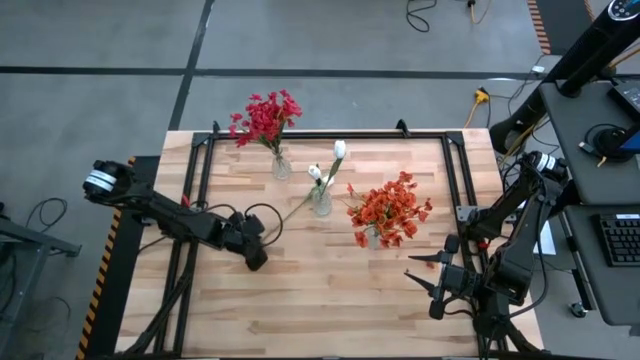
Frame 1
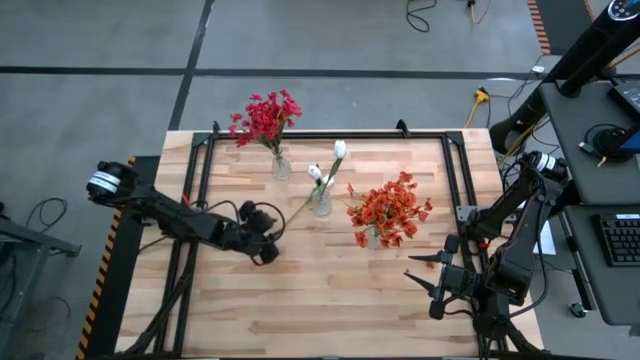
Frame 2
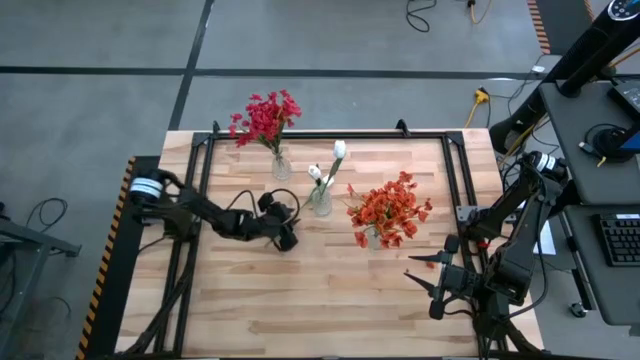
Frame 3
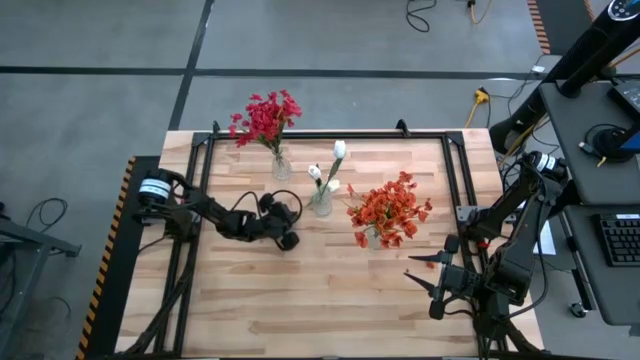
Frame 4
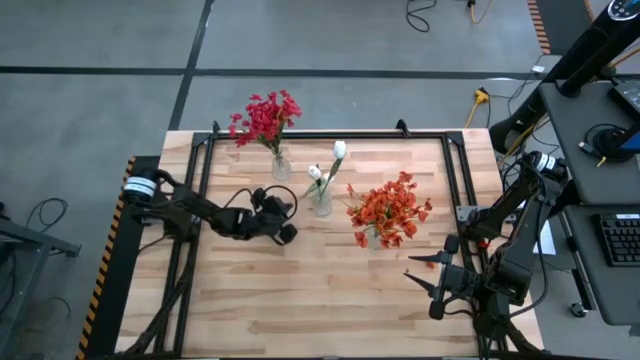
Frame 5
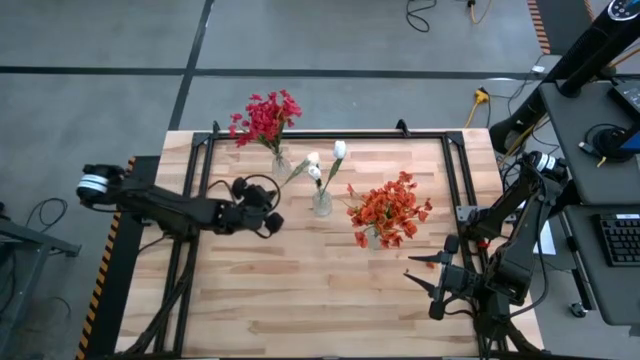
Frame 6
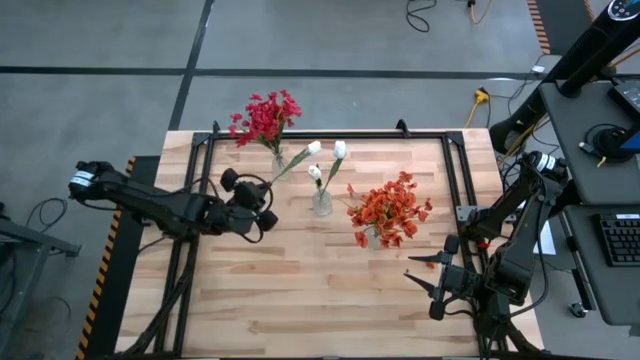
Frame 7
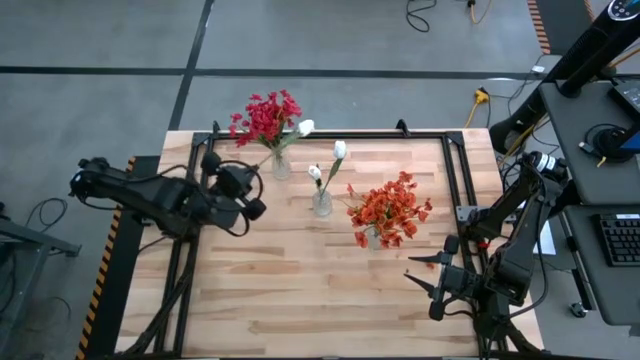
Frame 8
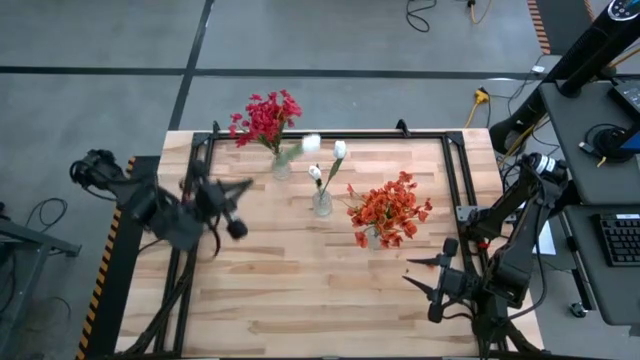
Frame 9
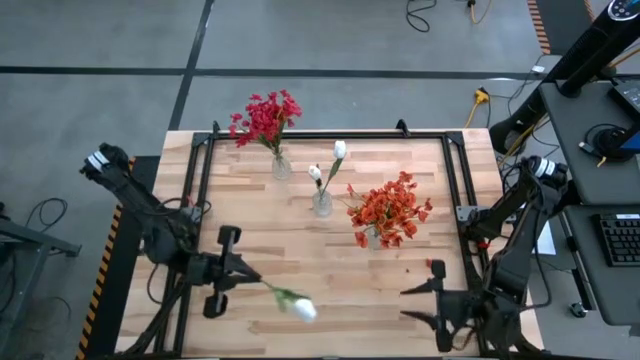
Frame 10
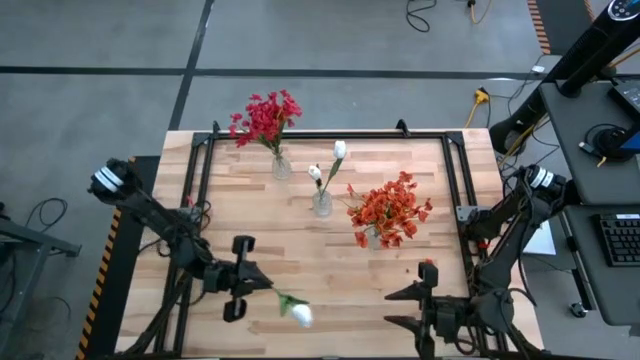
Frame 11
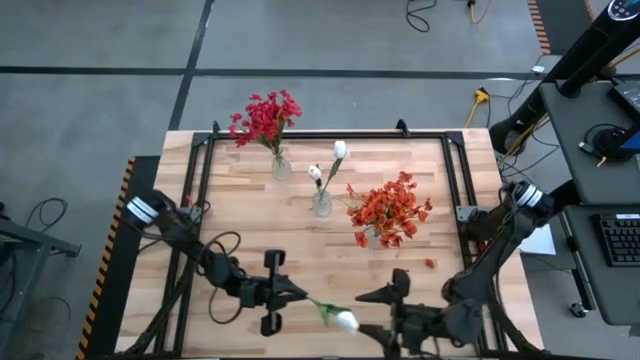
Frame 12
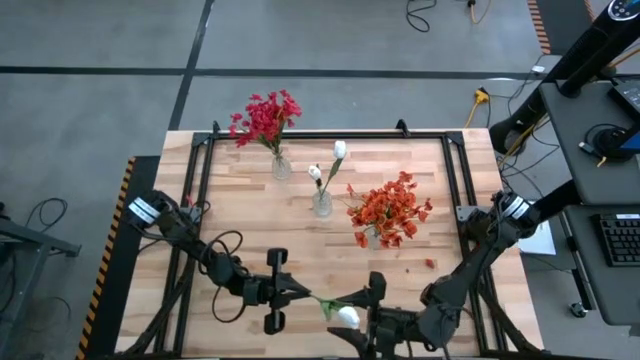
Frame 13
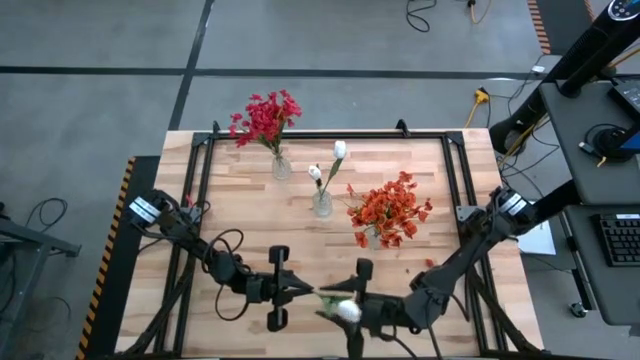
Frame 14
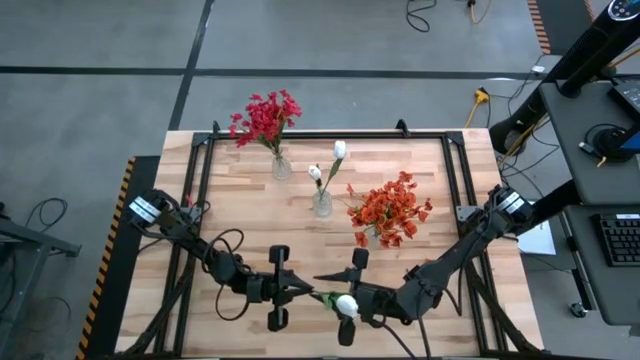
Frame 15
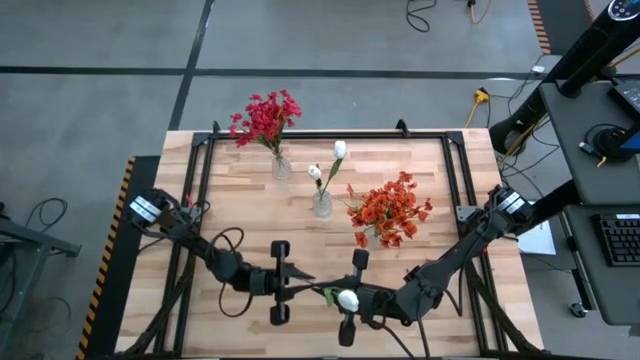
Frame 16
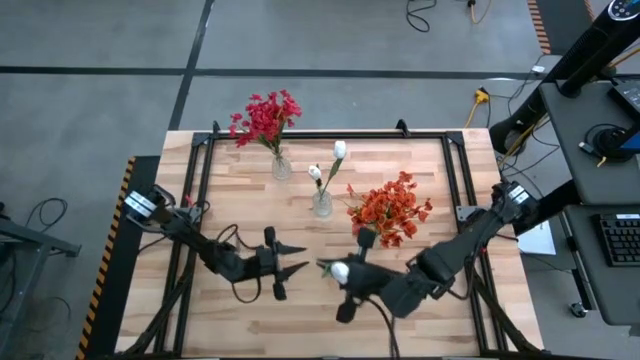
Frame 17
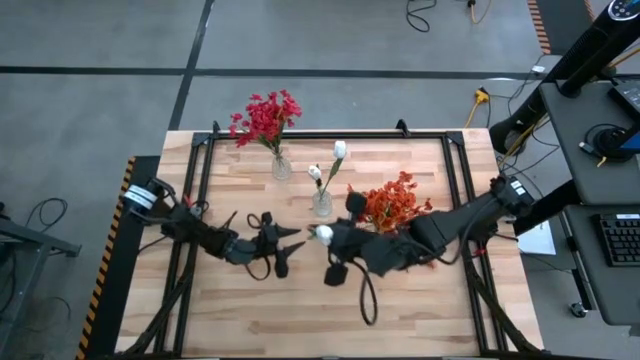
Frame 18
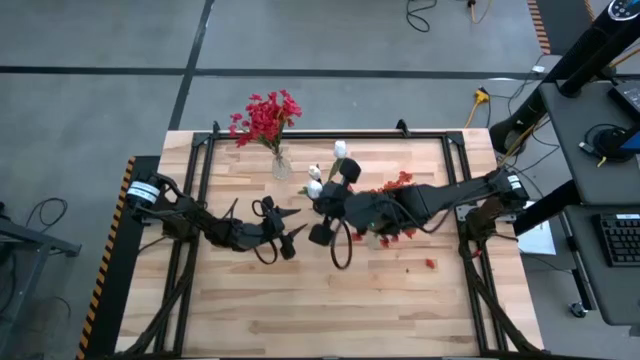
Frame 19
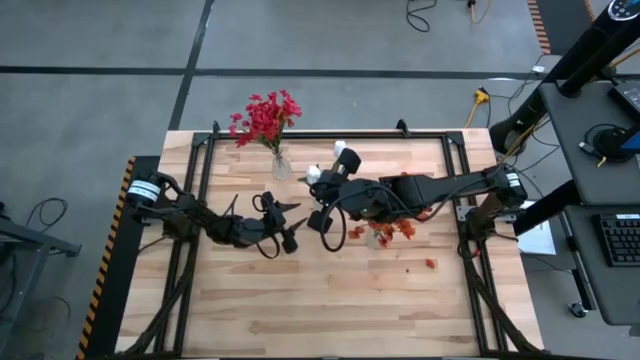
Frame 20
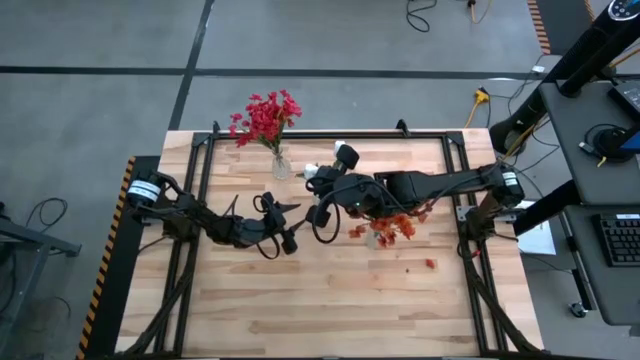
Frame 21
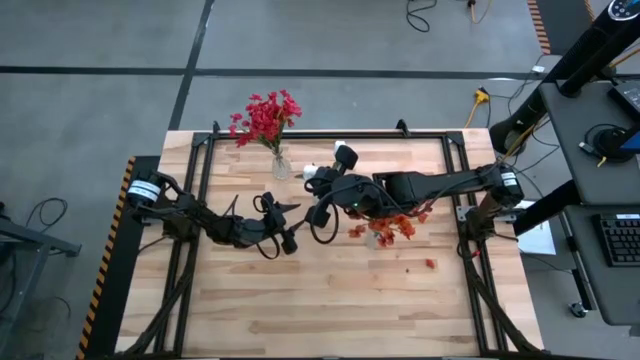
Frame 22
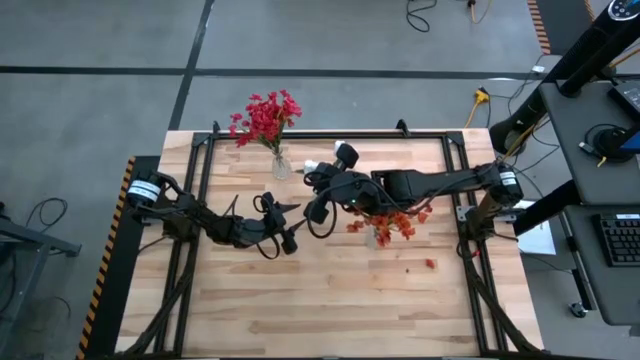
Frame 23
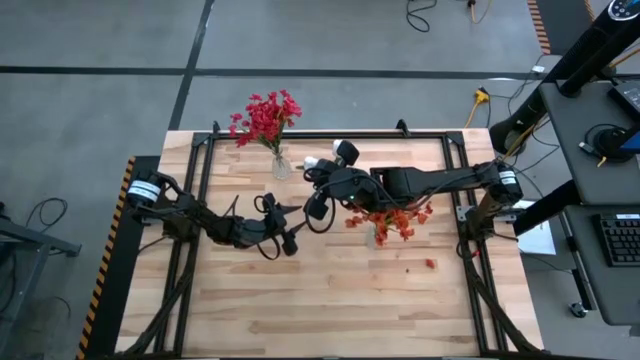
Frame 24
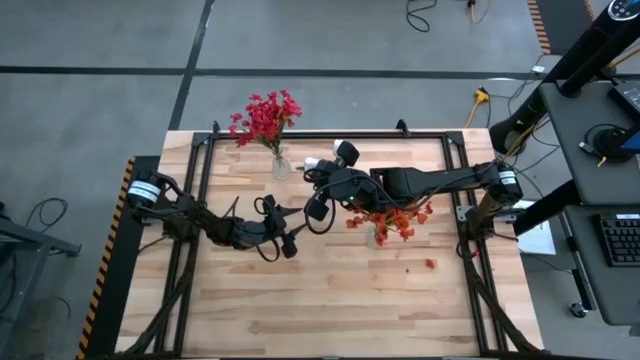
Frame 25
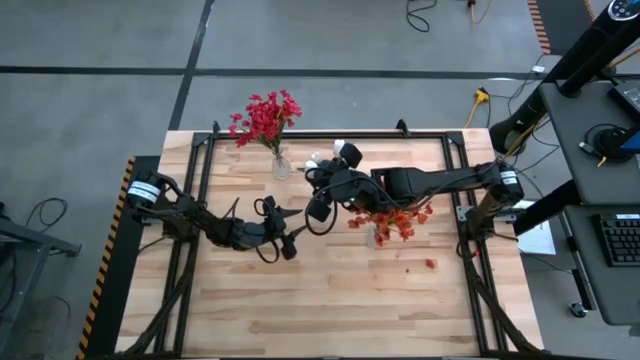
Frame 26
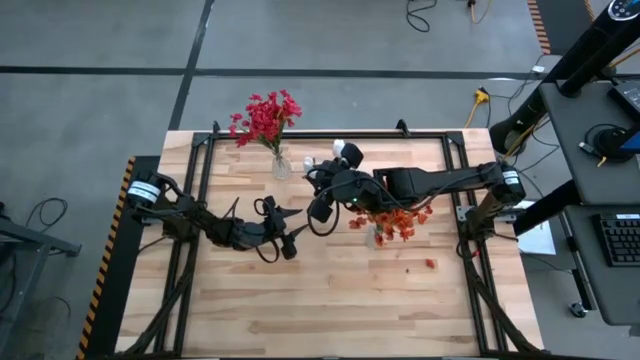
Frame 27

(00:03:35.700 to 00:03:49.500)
Task: Sort flowers into vase by color
Put the top center white tulip flower into the center transparent glass vase

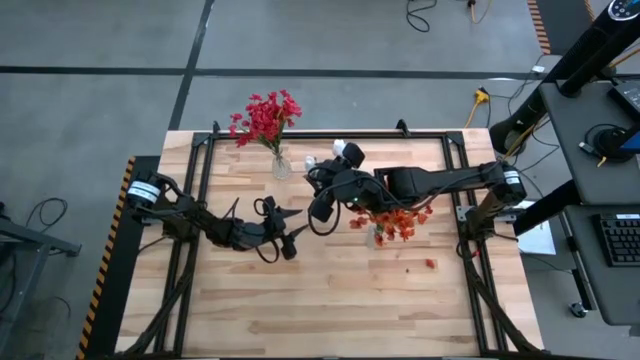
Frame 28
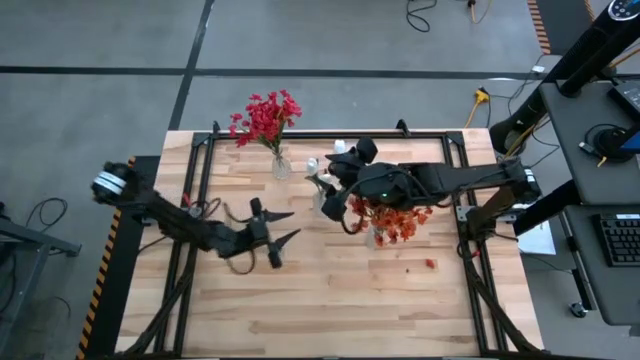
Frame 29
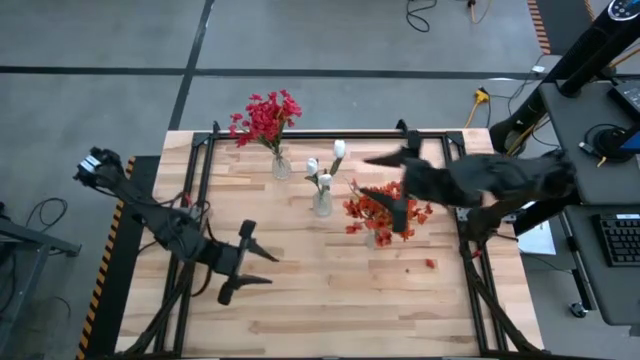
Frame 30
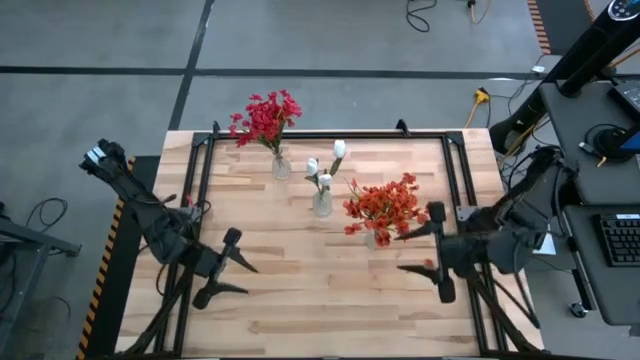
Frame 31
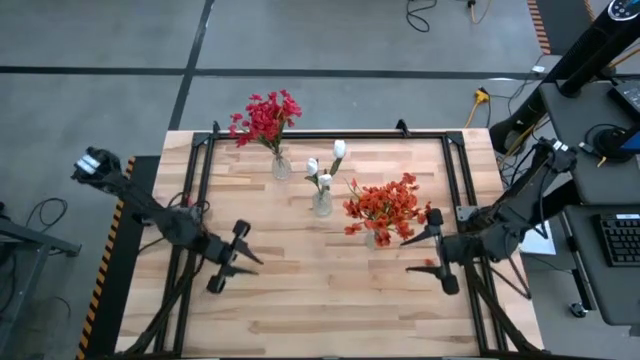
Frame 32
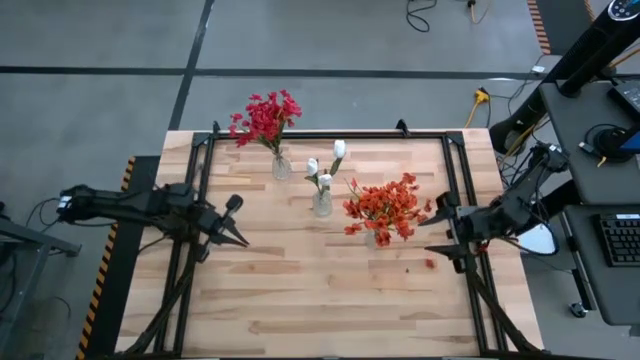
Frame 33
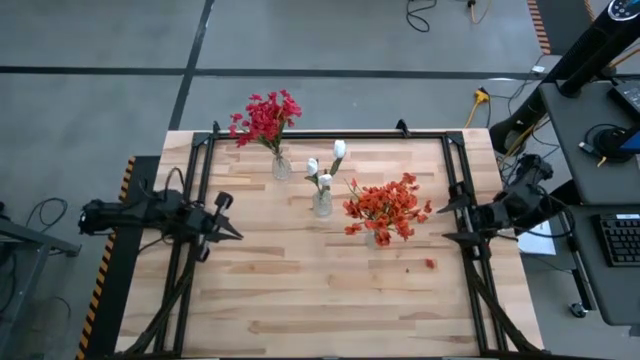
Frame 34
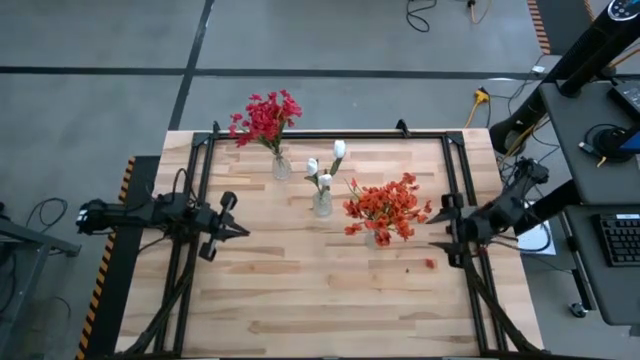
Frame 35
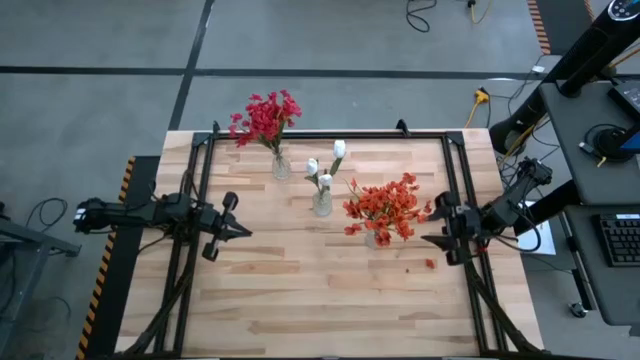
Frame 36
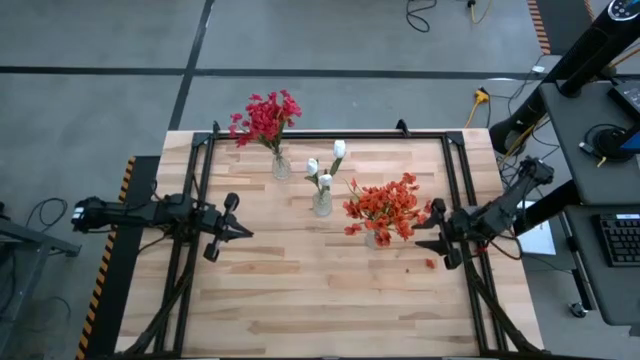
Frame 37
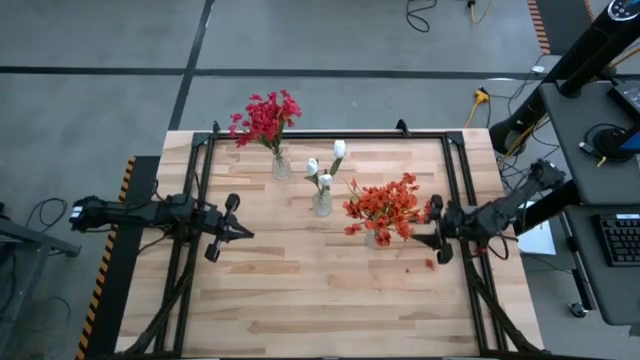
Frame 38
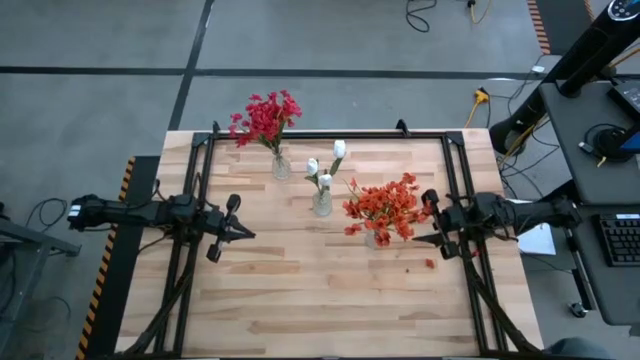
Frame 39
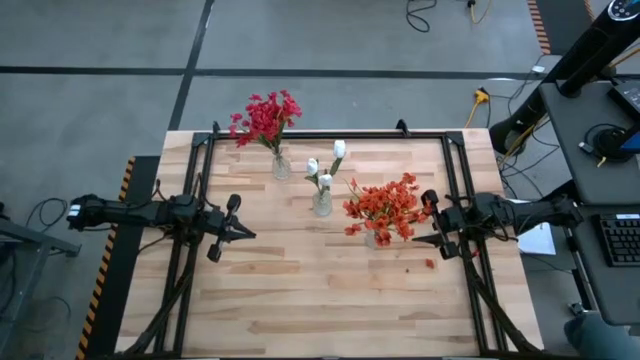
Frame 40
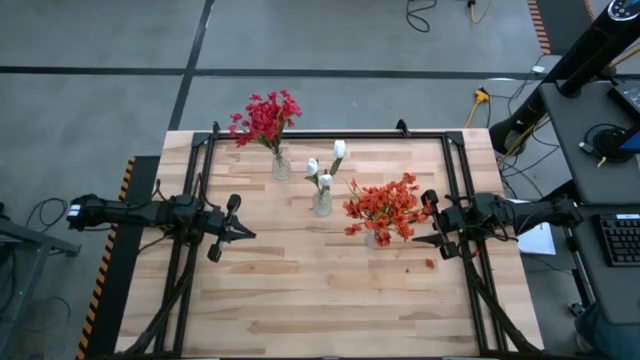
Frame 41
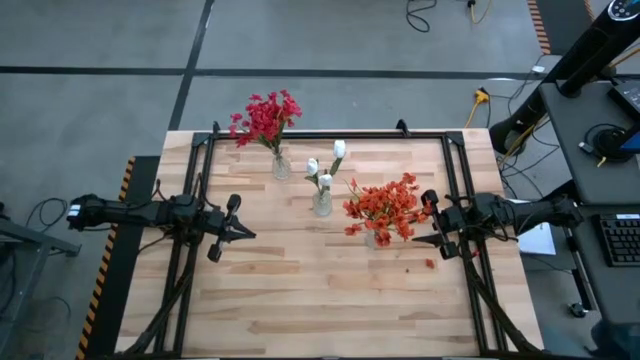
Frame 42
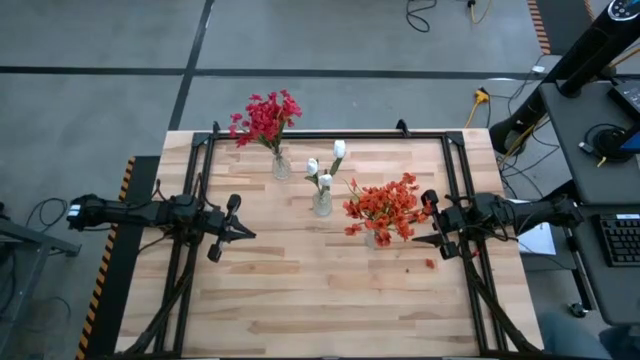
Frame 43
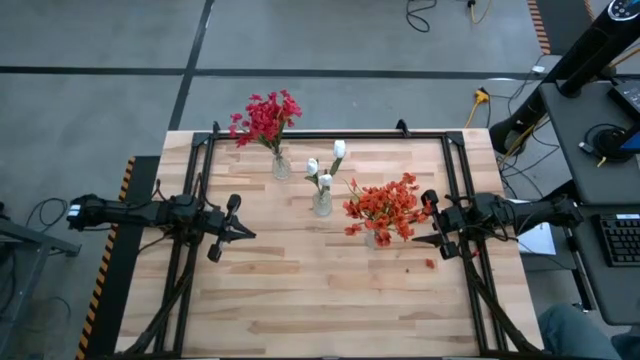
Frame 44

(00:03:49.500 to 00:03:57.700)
Return to Home Position
